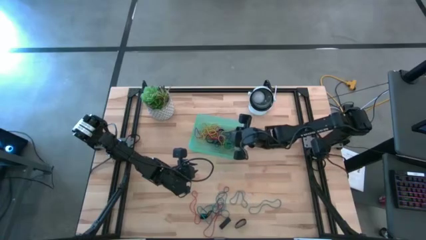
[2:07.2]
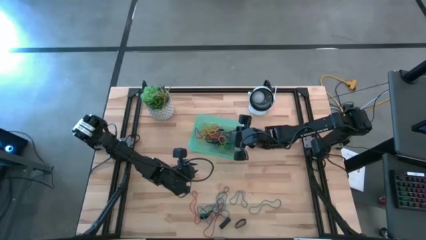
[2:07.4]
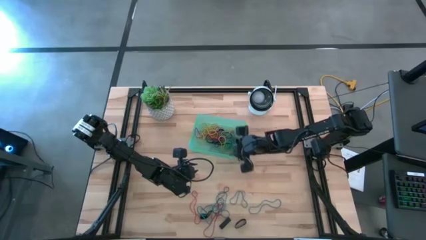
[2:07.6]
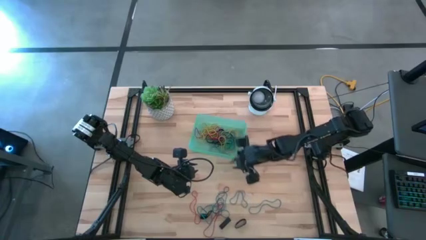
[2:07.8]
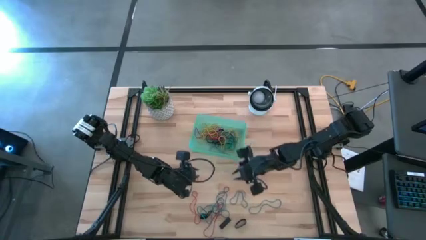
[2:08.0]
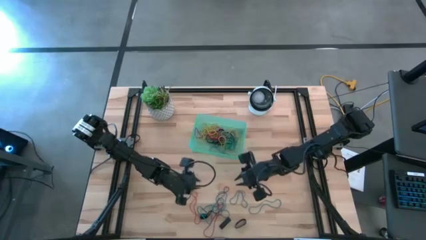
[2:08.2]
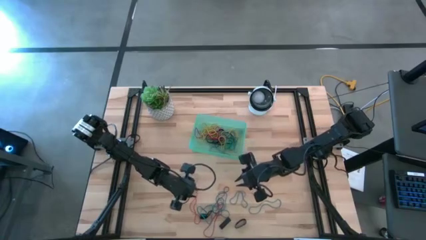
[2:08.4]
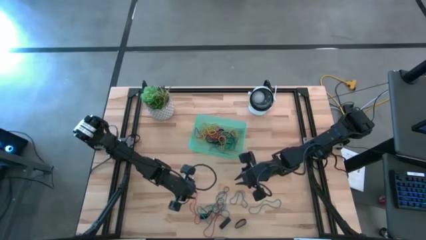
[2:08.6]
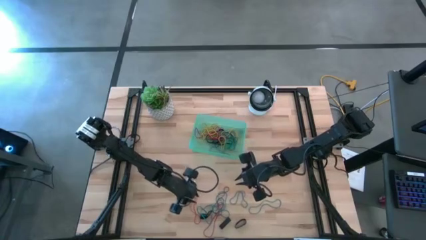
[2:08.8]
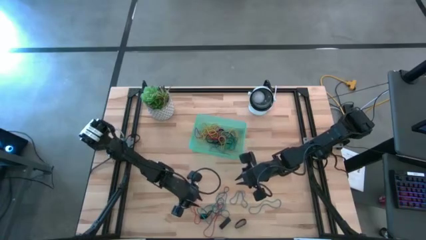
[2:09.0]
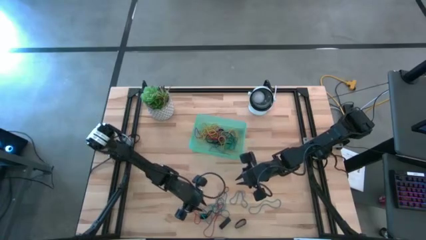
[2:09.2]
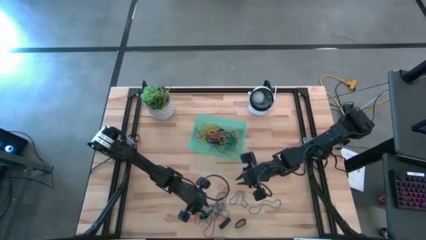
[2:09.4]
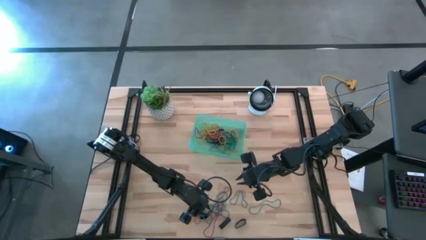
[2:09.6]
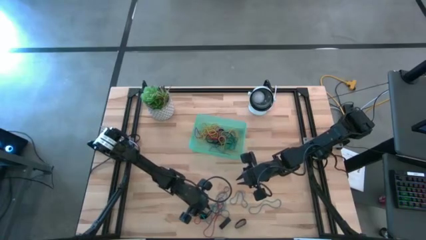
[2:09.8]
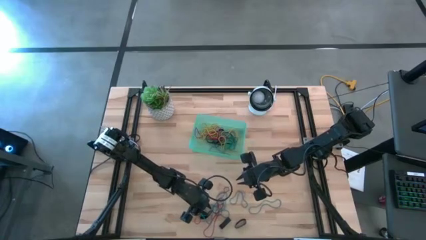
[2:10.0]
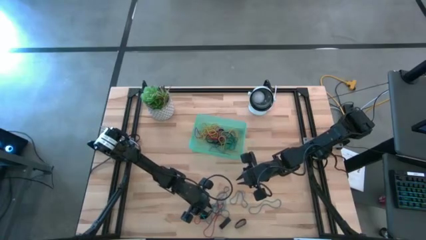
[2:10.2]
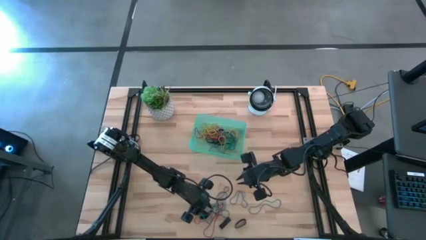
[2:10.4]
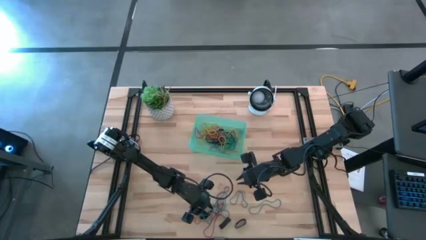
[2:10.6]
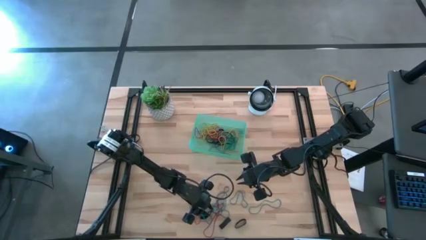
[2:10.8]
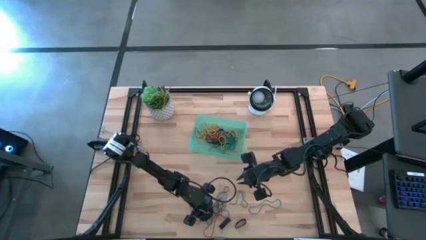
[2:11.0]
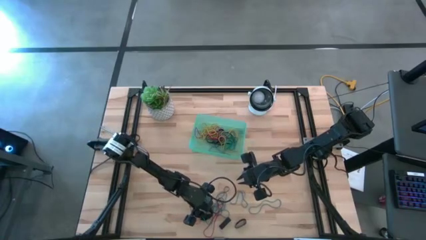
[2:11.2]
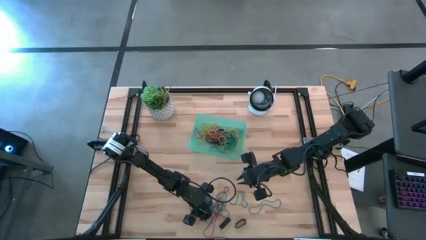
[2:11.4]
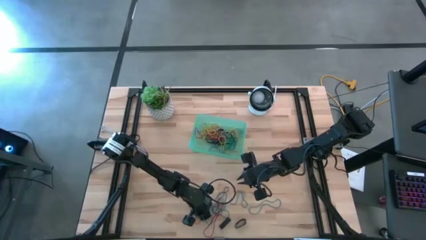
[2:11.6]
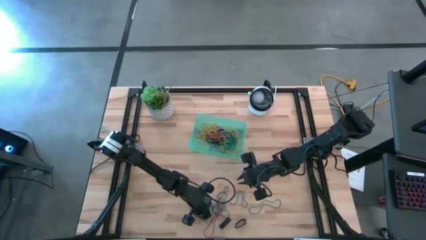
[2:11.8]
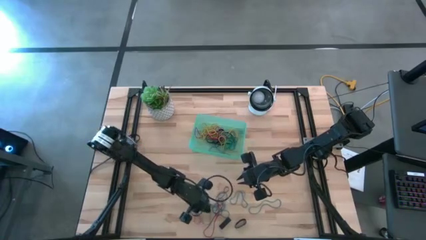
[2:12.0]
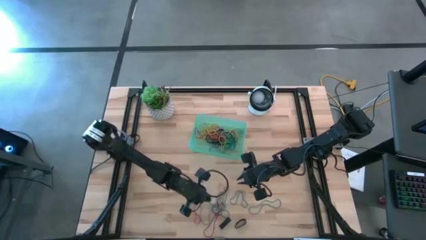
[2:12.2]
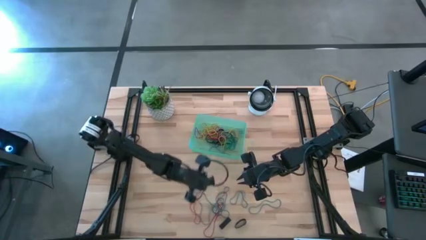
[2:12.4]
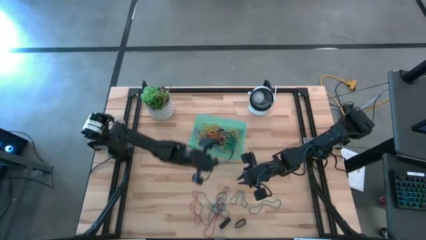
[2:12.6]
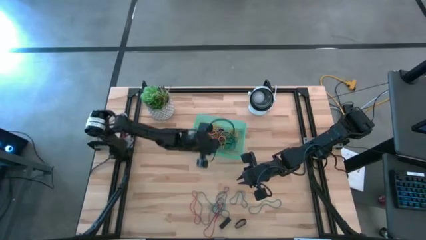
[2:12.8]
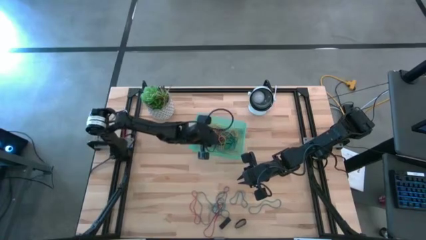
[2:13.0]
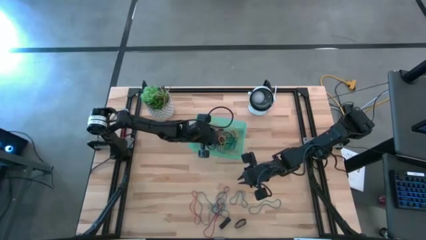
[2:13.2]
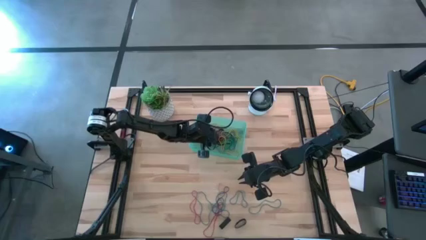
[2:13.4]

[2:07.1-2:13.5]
Task: Pick and place rubber bands into bin
Put the black rubber band into the green bin

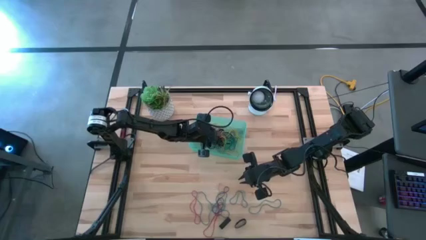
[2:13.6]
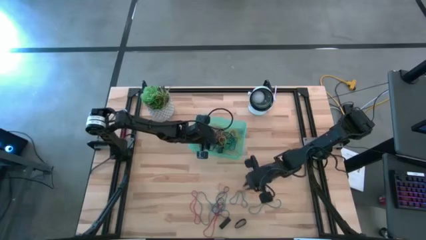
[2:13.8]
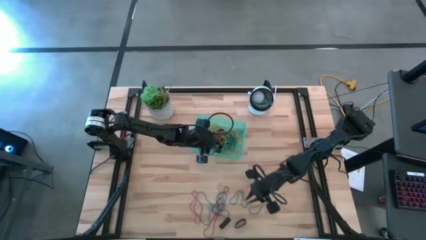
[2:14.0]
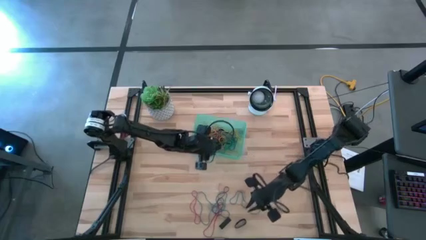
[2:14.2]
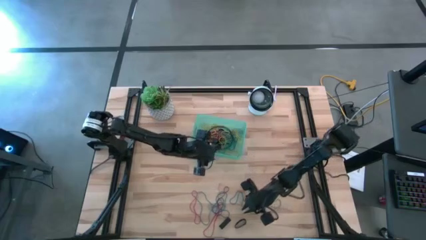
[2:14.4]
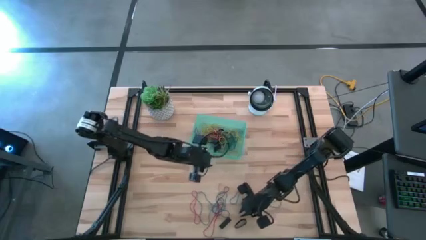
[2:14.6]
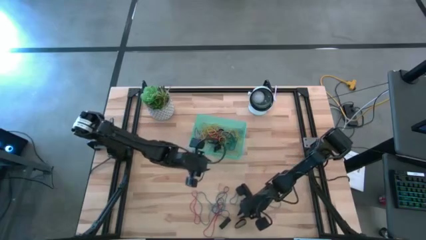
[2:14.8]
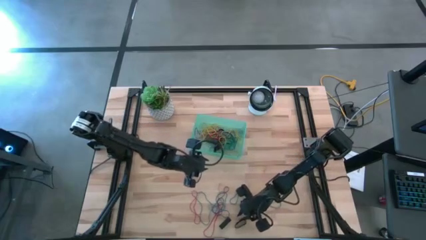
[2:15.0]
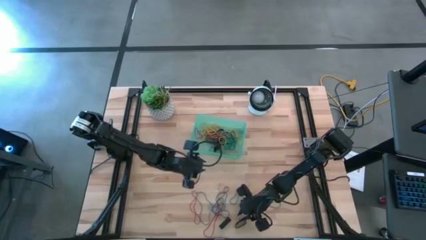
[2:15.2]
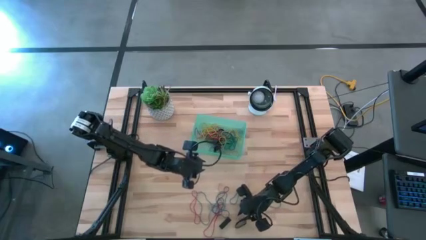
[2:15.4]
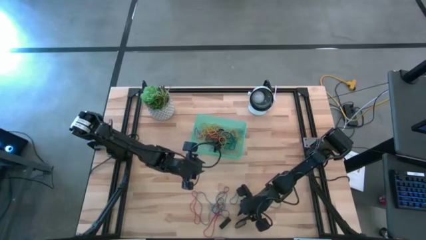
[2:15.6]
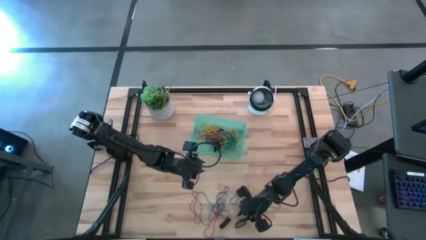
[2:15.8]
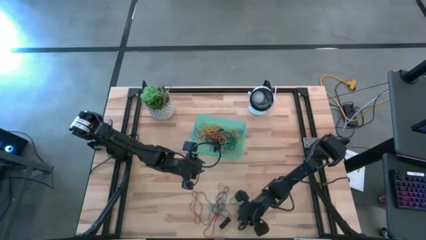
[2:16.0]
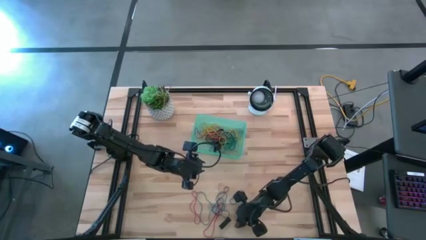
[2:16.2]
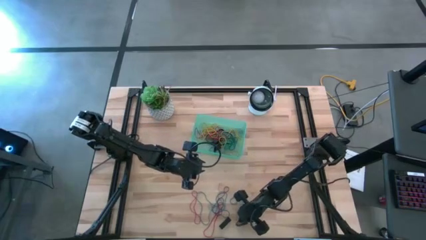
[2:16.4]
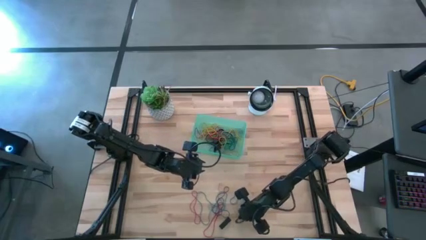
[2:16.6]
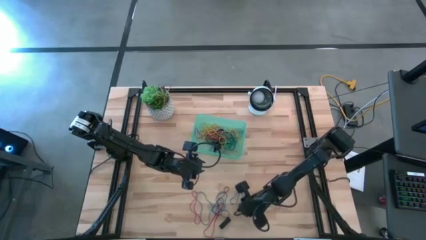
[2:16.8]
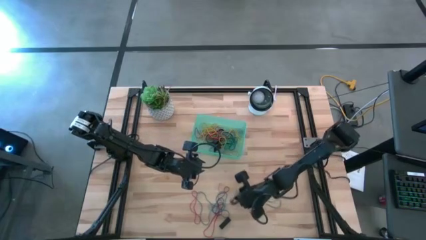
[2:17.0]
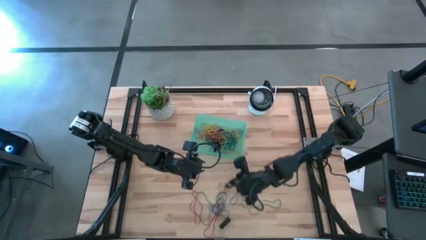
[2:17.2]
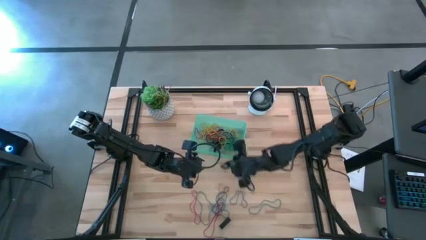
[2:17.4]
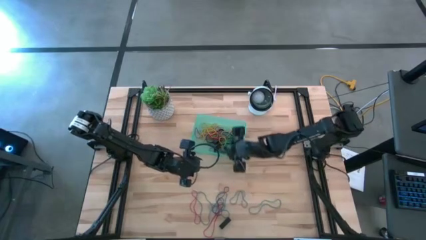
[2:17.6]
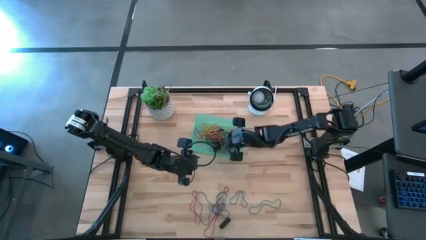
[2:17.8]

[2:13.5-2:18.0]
Put the black rubber band into the green bin

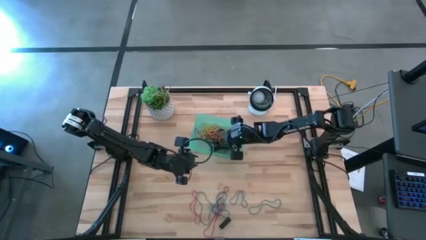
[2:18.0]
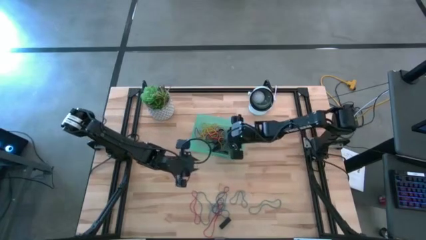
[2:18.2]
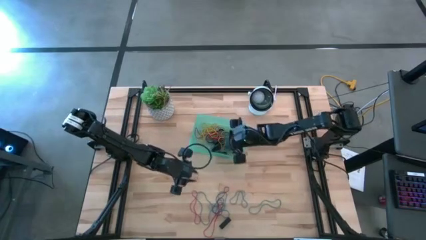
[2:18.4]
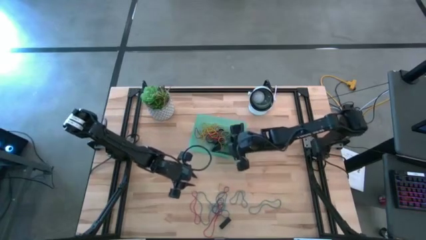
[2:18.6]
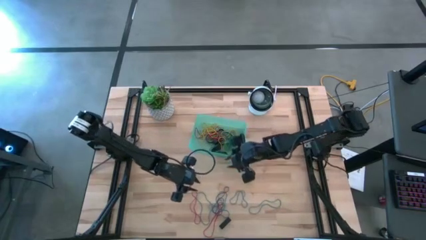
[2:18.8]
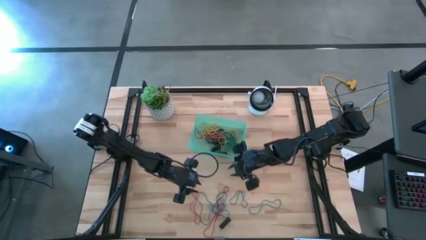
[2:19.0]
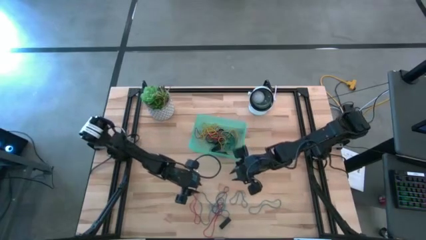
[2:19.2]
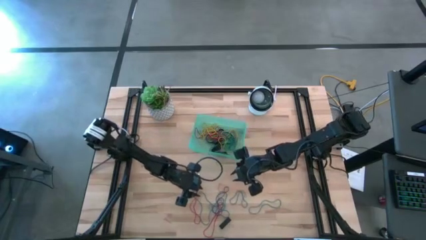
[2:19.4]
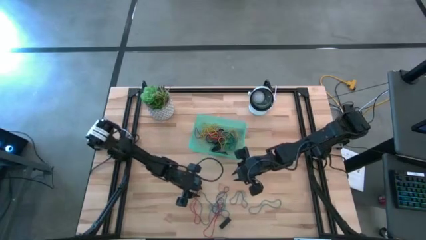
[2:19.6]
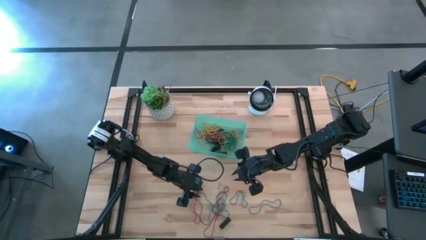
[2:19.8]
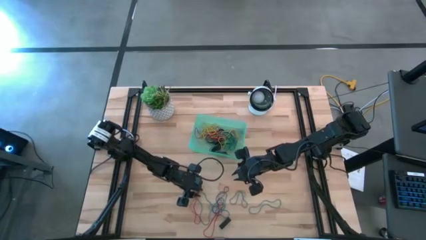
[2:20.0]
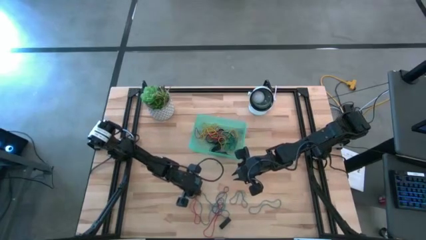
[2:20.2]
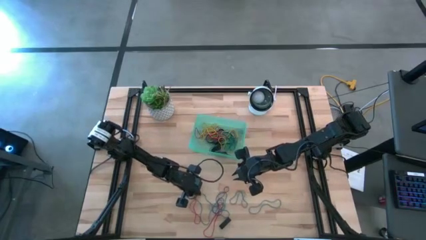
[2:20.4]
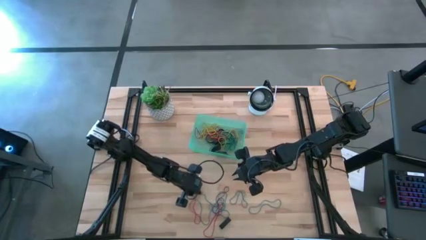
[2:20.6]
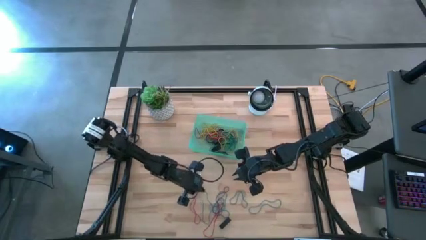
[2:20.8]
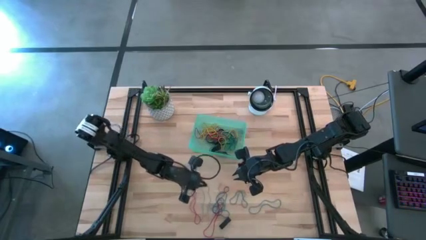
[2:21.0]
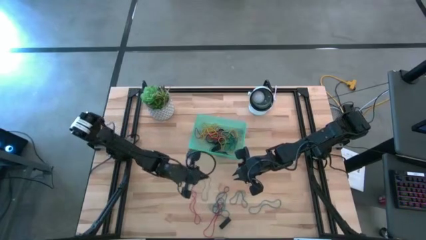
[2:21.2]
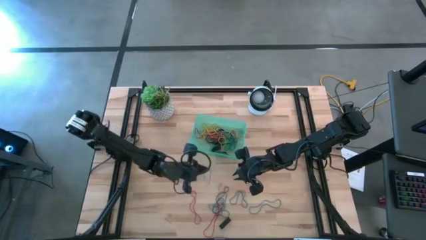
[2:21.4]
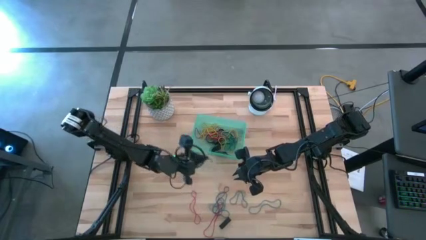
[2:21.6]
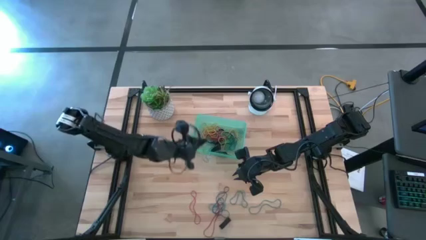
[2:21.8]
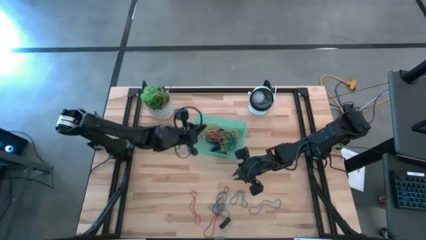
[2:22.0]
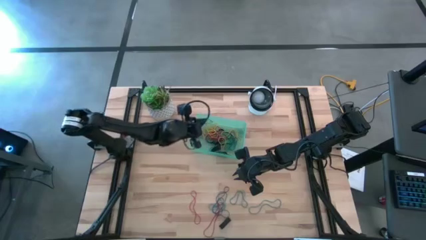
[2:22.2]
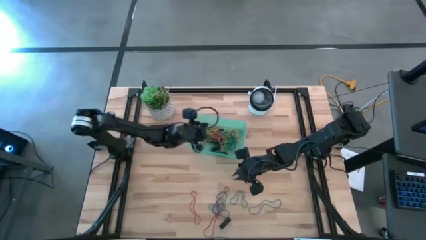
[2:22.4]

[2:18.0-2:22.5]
Put the blue rubber band into the green bin

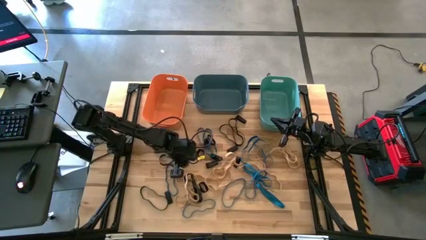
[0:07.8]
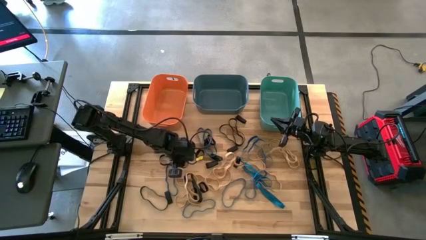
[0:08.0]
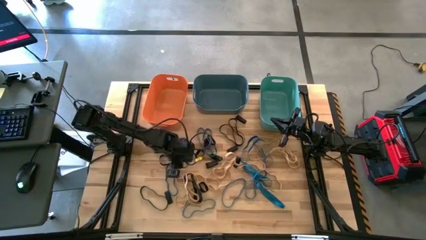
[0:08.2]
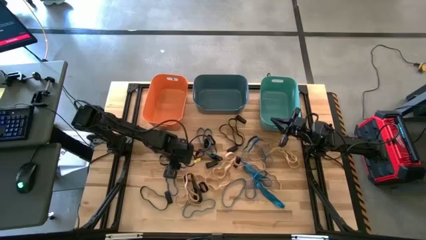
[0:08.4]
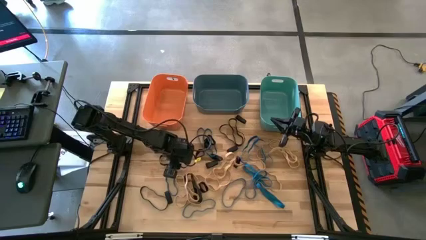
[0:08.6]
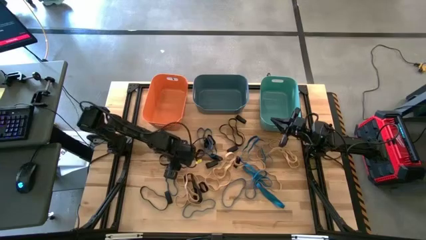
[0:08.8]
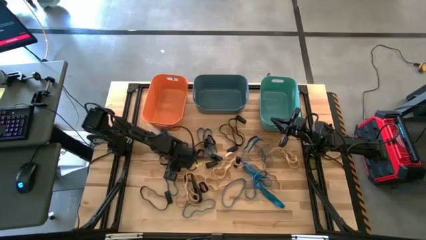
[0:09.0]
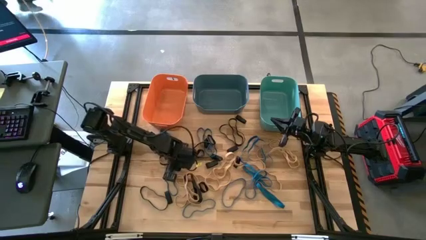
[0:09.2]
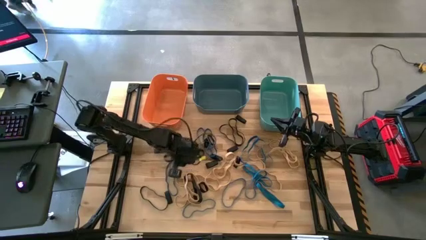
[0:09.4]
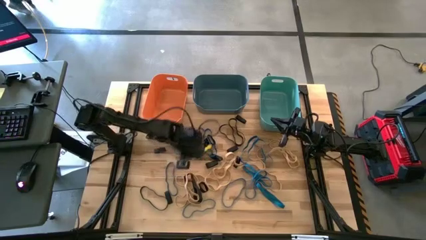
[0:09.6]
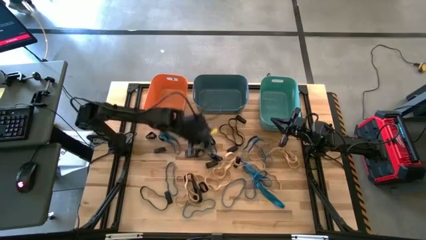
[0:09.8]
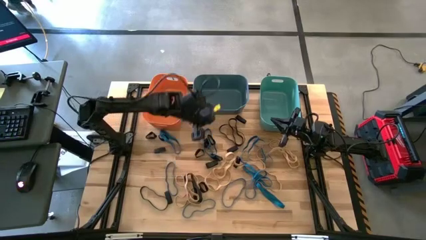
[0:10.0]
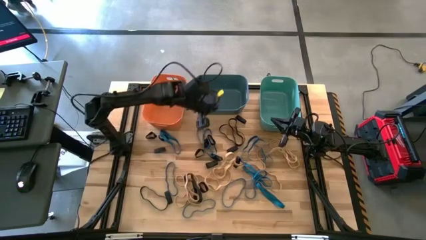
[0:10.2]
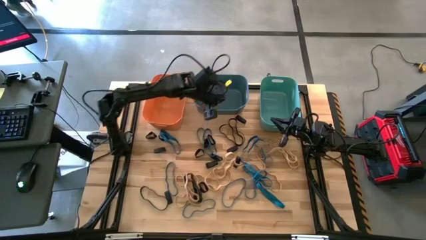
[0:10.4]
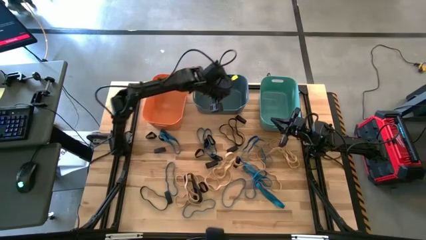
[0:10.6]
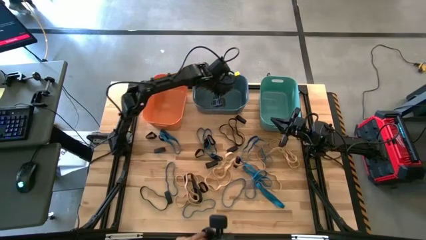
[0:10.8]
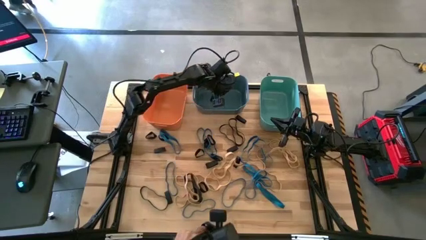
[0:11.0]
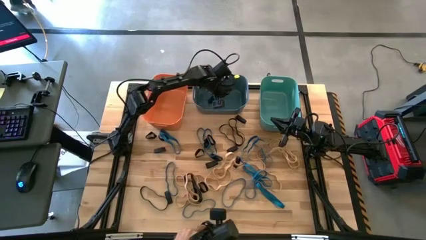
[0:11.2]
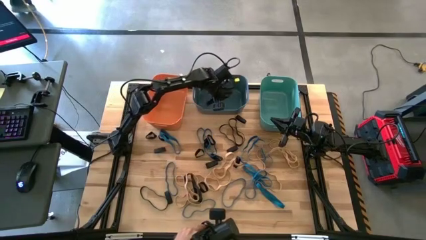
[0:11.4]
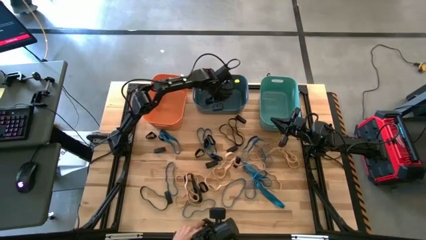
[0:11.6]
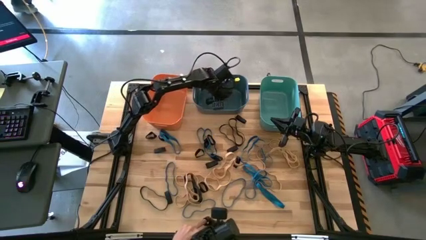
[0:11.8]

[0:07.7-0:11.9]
Task: Sort rubber bands into baskets
Put the black rubber band into the blue bin
